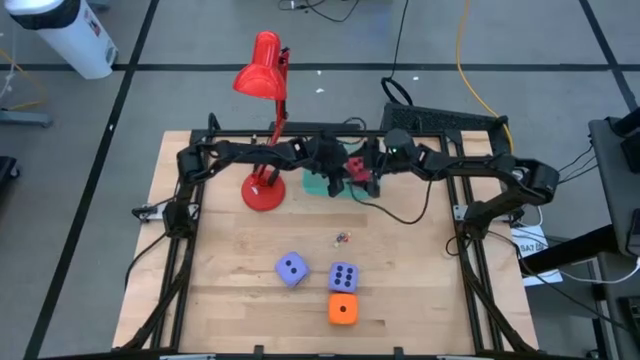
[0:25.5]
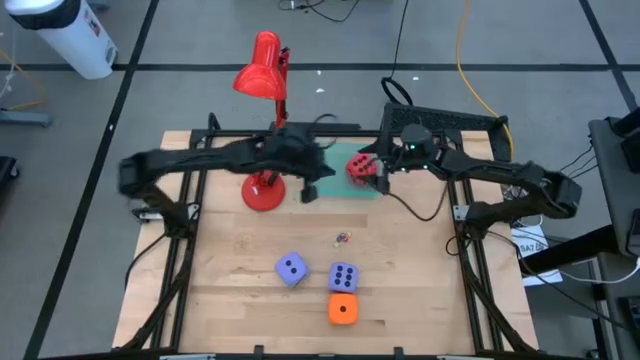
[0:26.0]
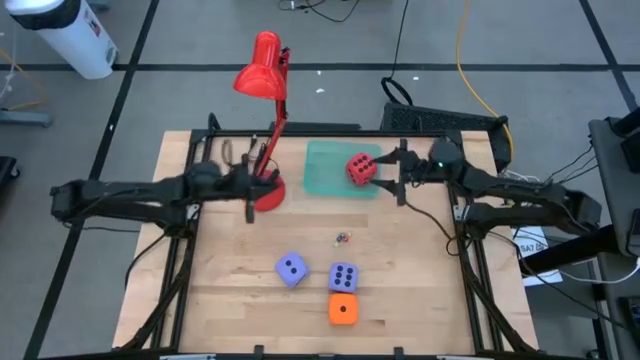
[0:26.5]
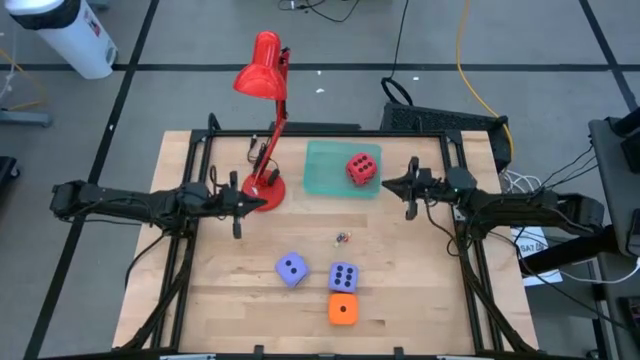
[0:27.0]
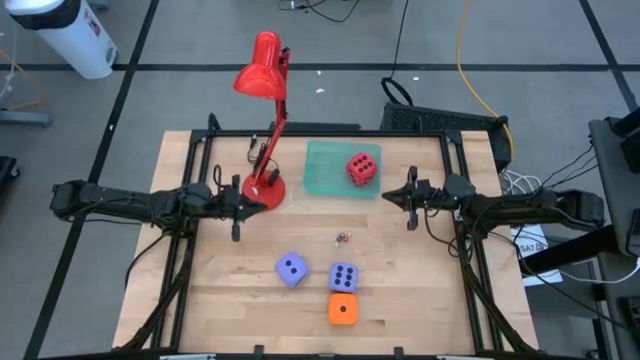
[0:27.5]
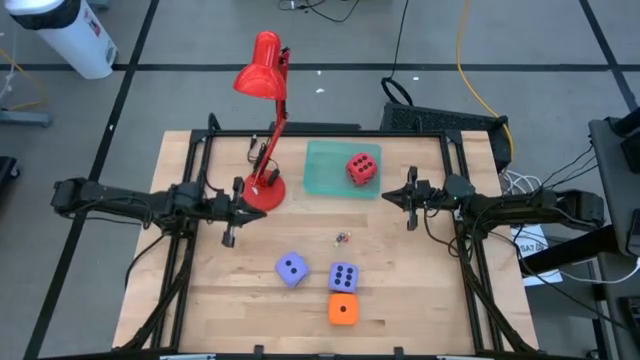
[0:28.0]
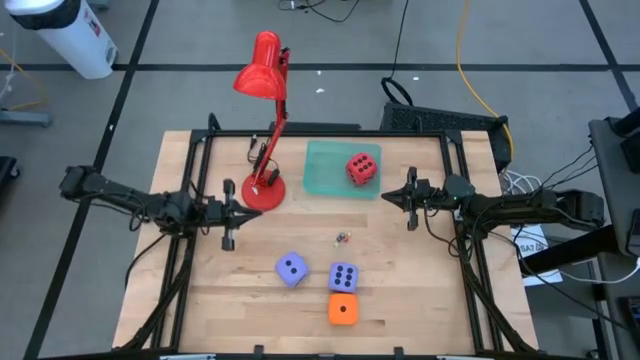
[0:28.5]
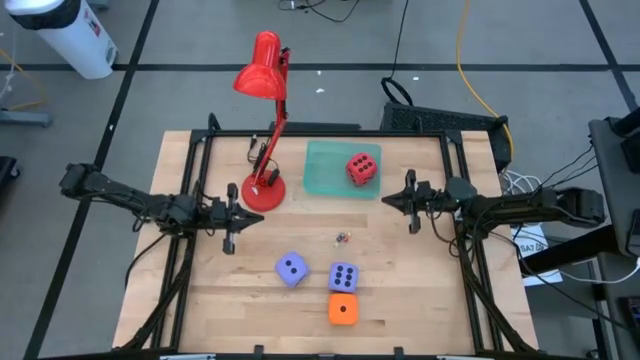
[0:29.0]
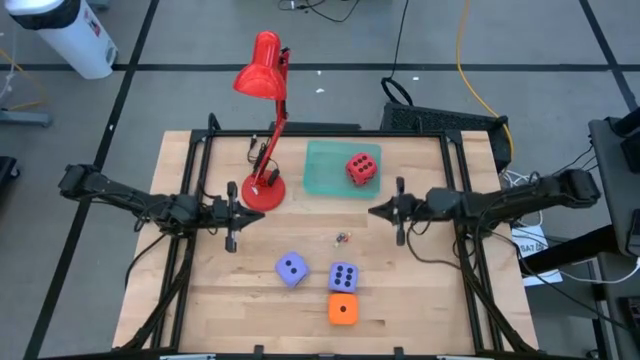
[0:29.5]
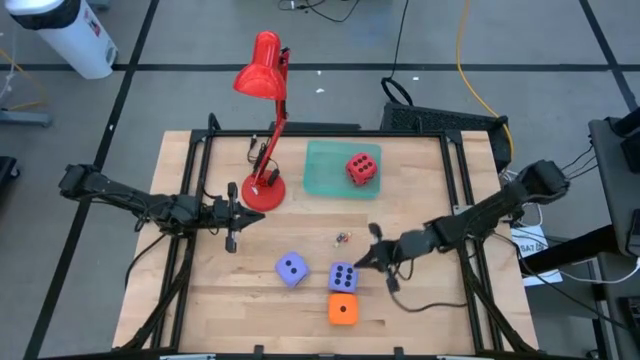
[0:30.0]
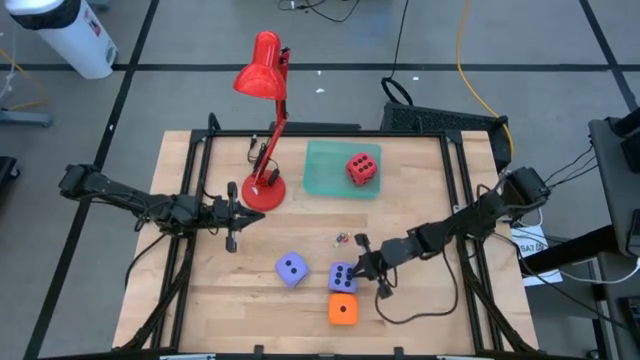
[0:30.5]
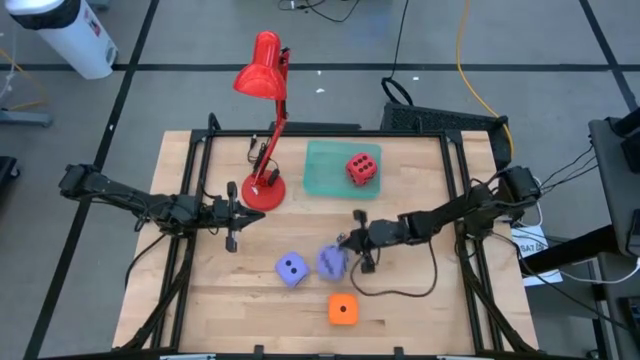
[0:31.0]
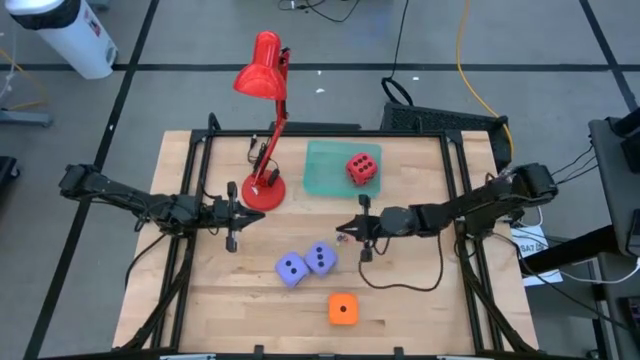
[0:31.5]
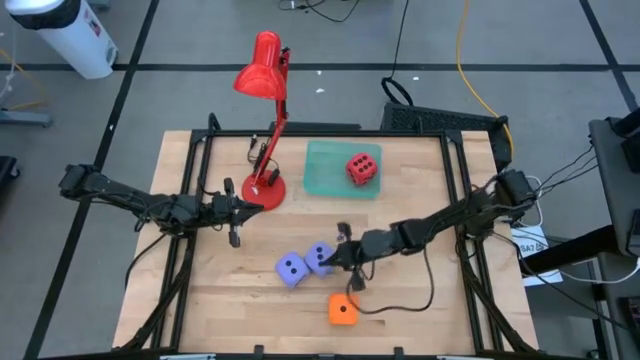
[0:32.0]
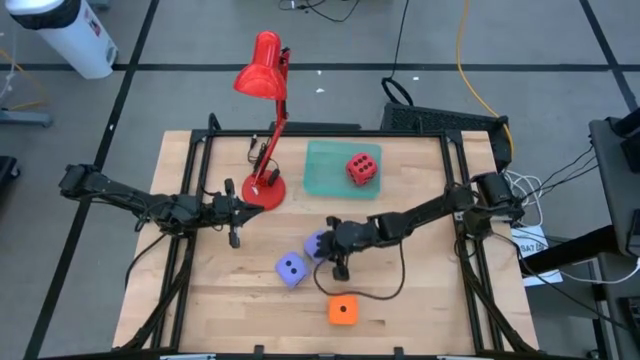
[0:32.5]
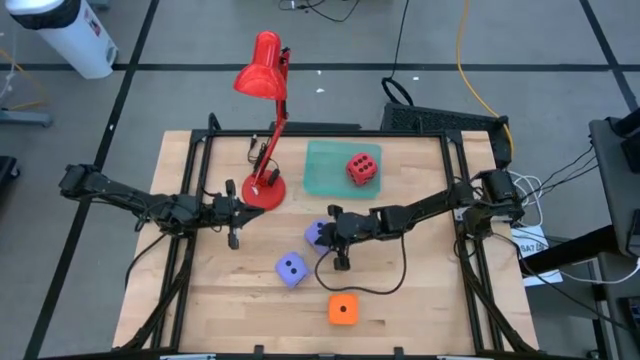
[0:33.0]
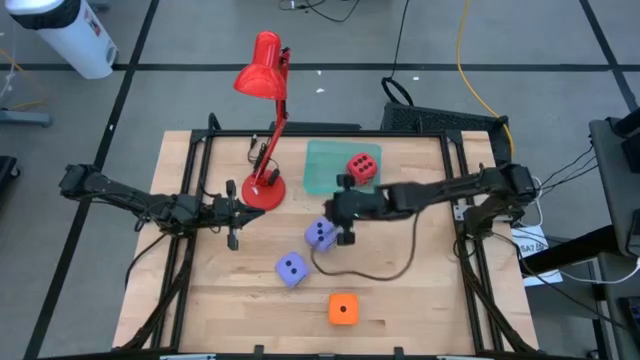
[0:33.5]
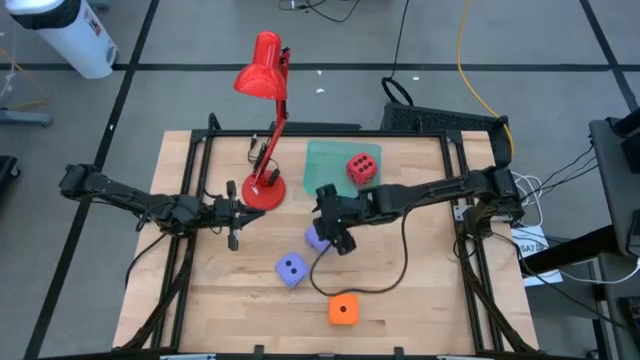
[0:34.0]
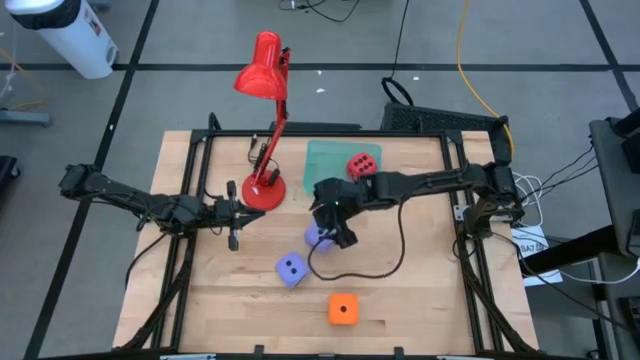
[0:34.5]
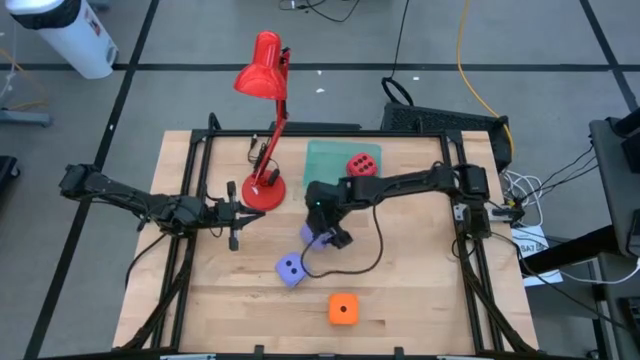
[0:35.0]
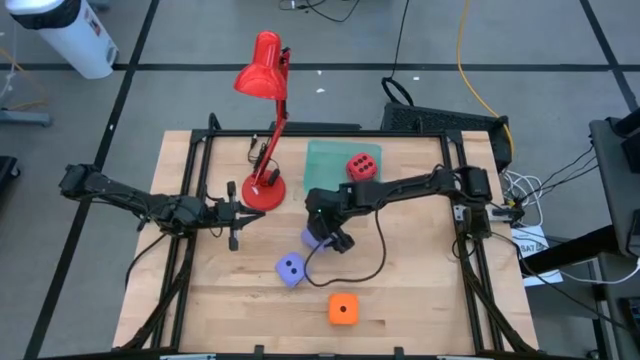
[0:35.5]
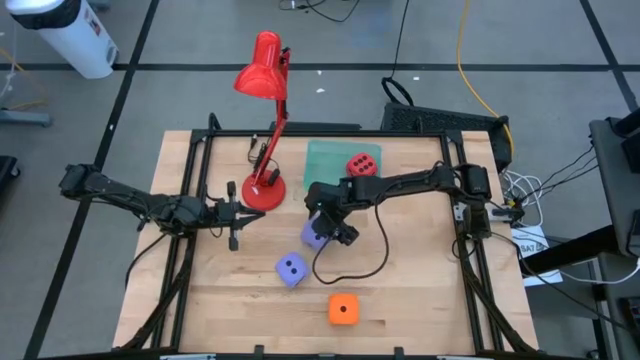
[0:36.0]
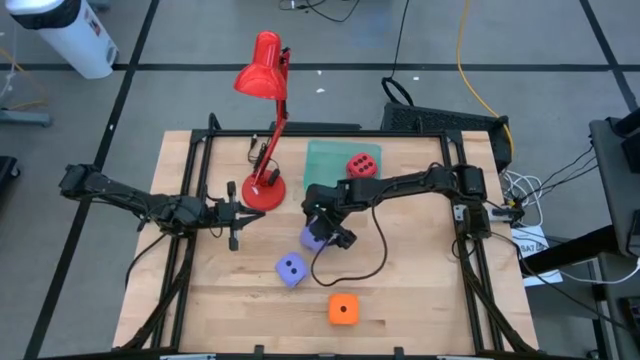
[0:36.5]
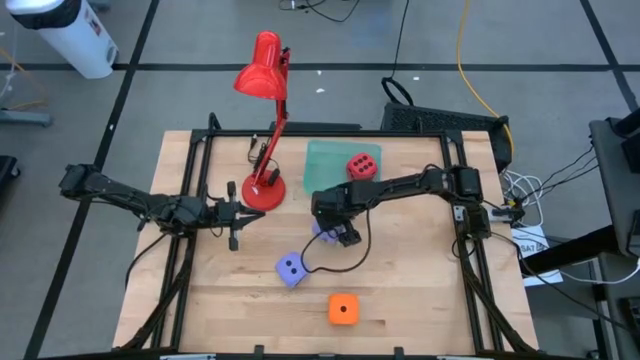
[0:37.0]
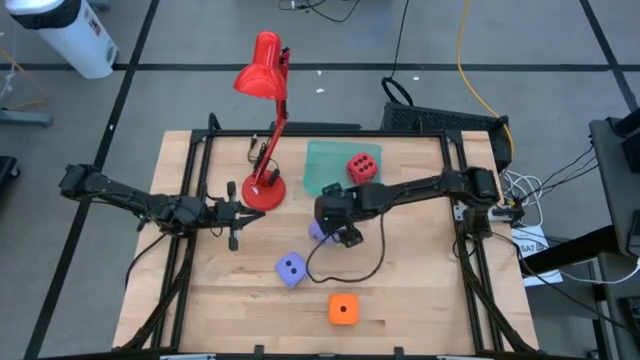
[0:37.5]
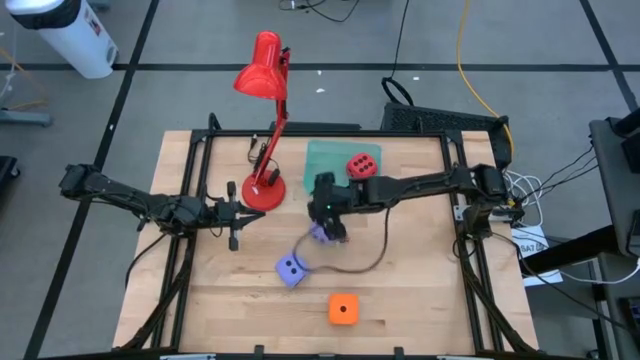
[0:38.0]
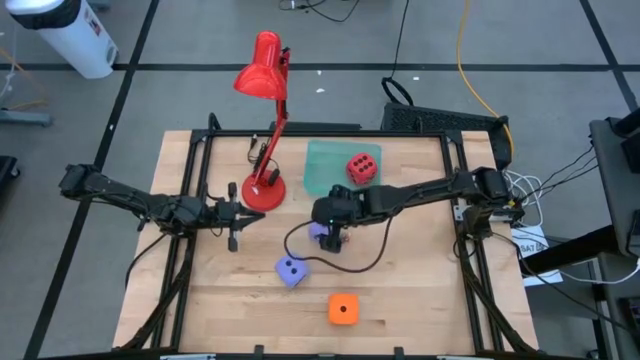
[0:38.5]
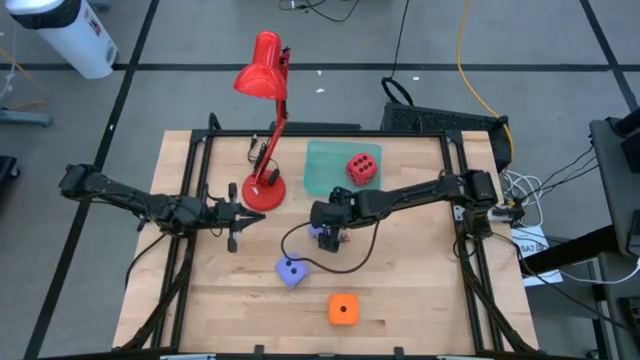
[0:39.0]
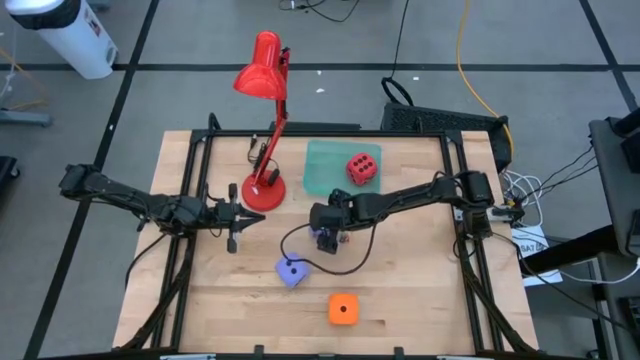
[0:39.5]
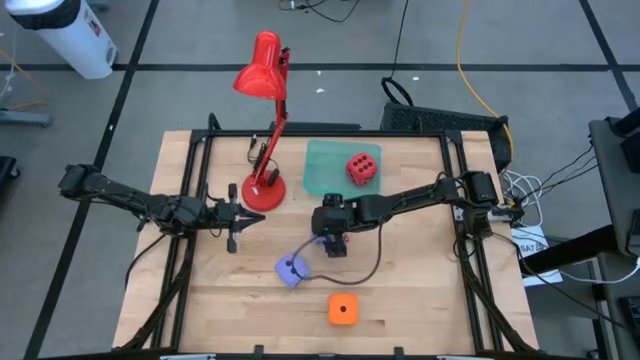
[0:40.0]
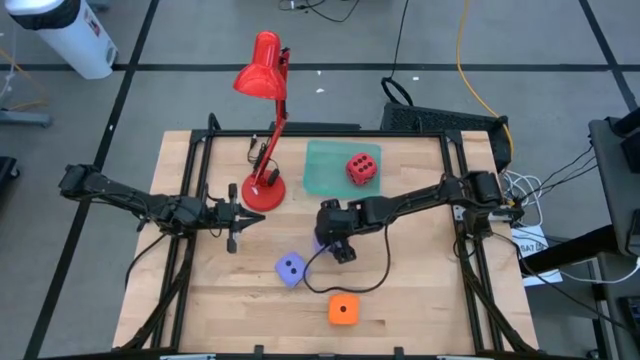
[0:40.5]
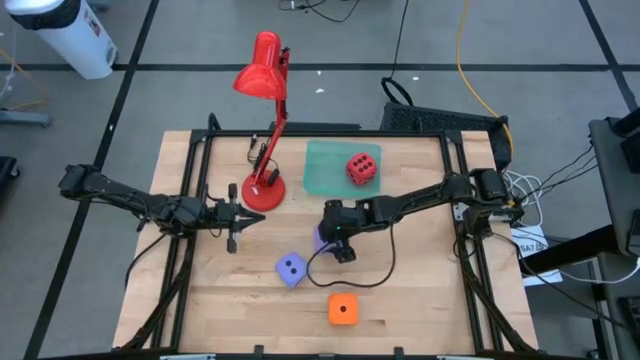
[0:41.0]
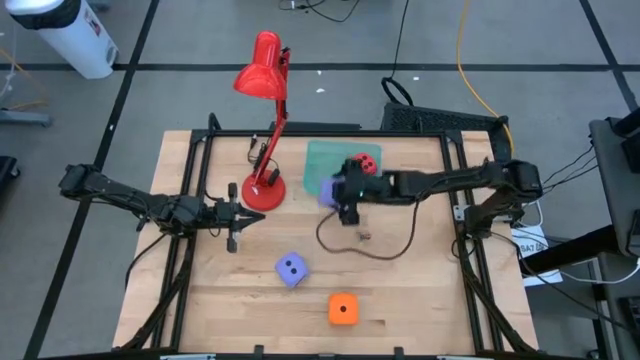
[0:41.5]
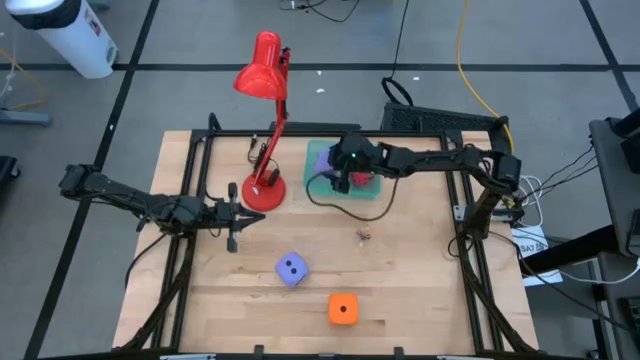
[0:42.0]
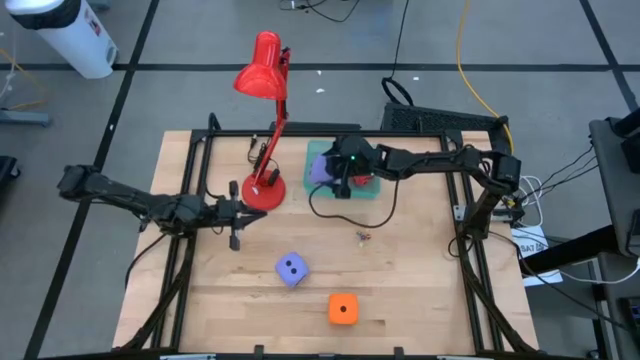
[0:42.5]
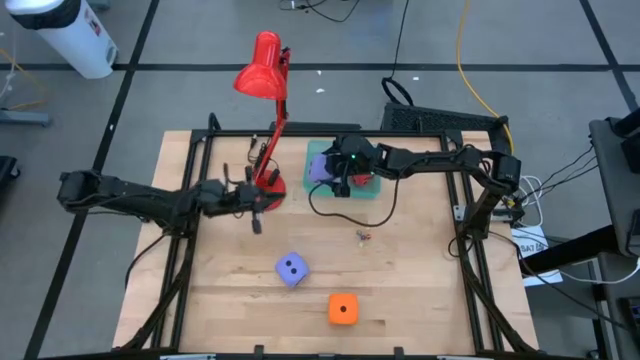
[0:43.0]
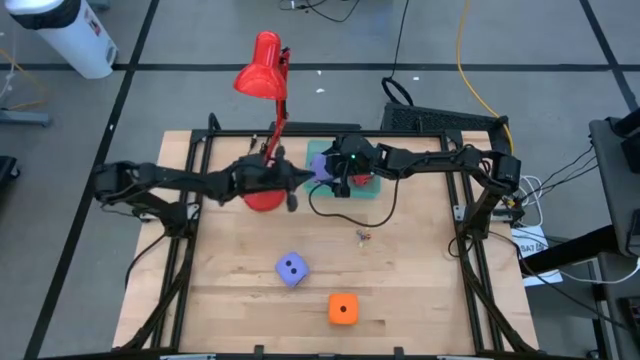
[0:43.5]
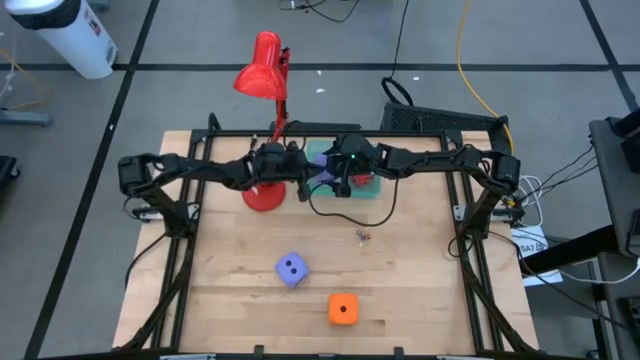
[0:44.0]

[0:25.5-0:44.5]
Task: Pick & Place Dice
Put the light purple die into the green bin
